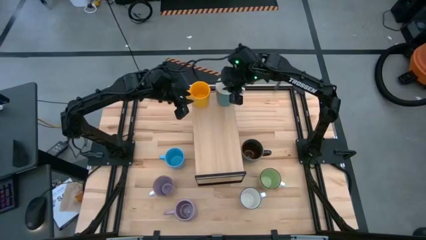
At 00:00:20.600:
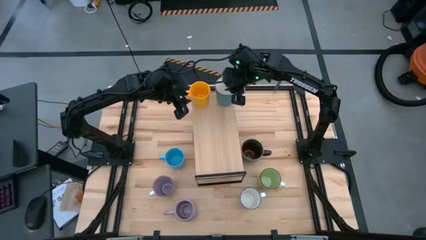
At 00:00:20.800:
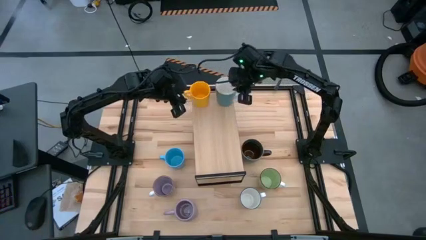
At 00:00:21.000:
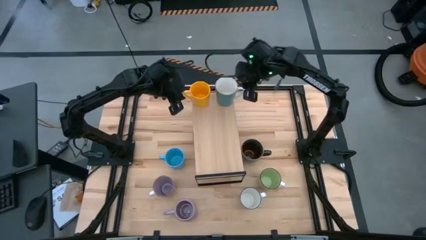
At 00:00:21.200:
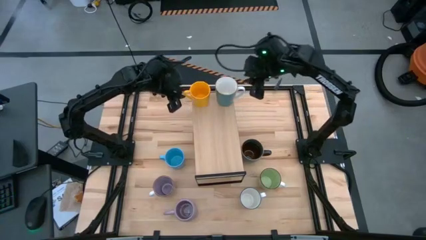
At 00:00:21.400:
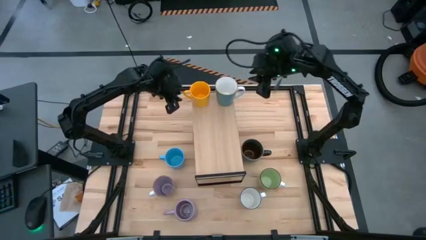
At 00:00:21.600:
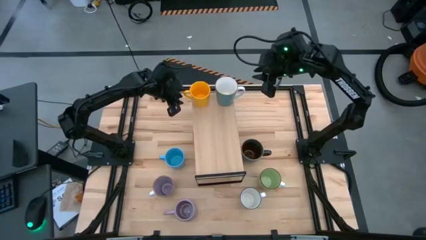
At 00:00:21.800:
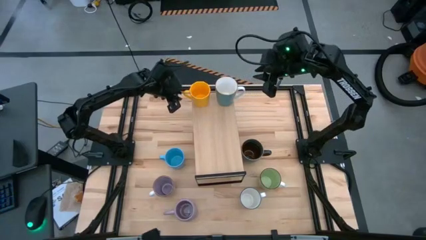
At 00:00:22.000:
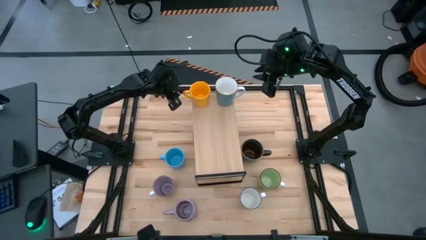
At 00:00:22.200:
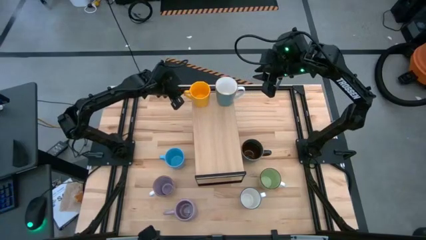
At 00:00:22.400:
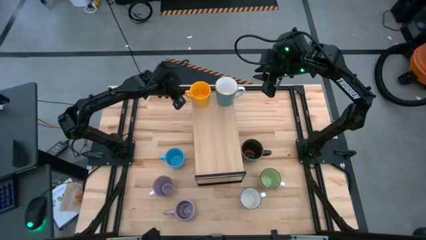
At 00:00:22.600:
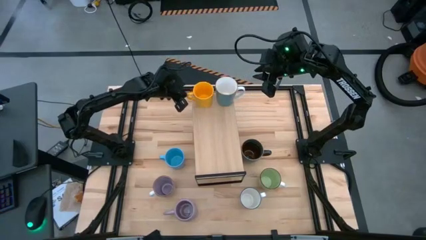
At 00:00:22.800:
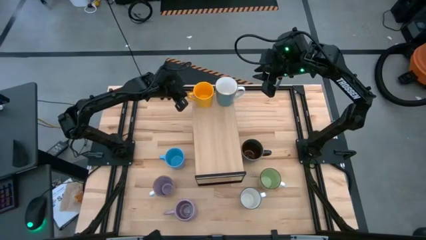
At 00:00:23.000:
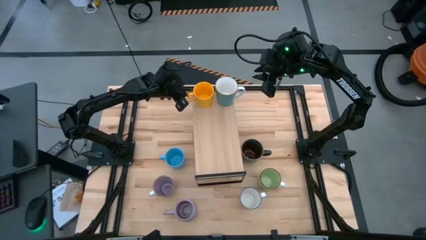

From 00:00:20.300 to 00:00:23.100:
Task: Place coffee mugs
Adjust the yellow cup on the shelf

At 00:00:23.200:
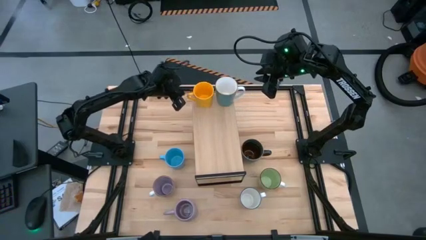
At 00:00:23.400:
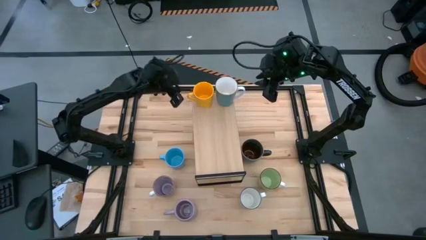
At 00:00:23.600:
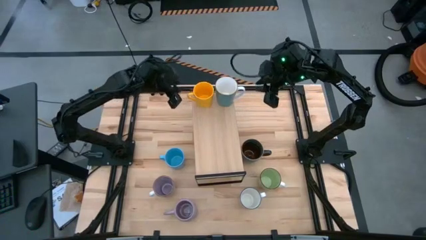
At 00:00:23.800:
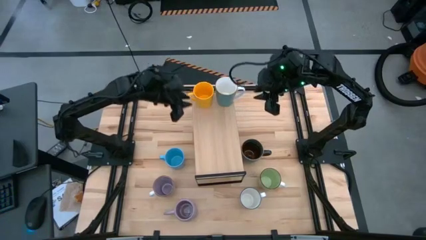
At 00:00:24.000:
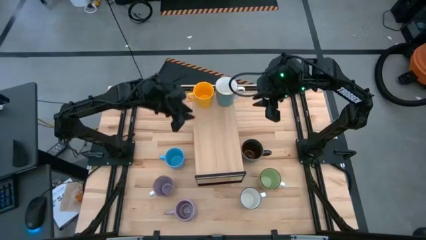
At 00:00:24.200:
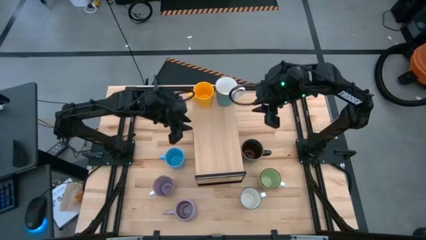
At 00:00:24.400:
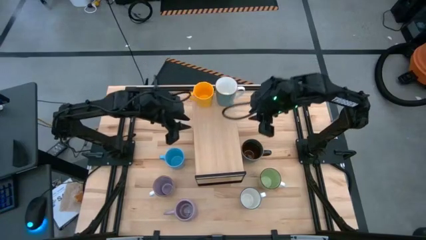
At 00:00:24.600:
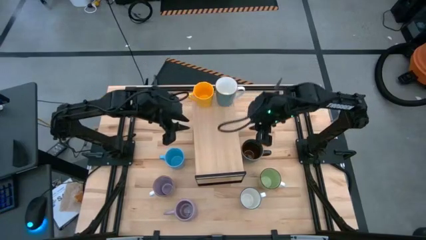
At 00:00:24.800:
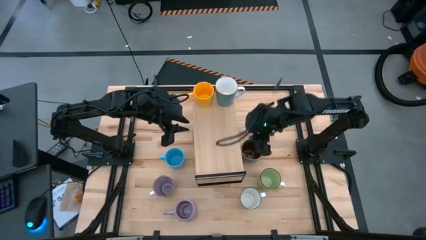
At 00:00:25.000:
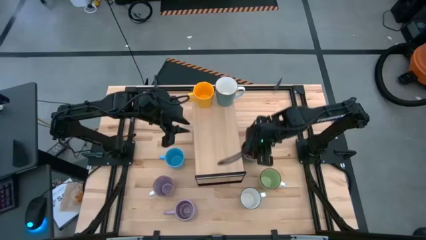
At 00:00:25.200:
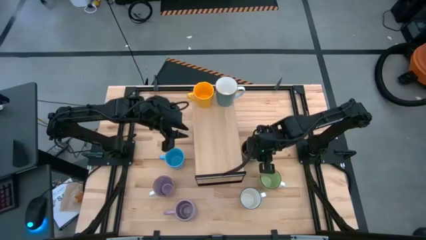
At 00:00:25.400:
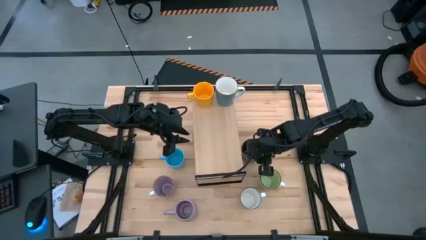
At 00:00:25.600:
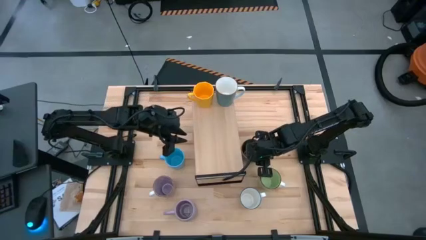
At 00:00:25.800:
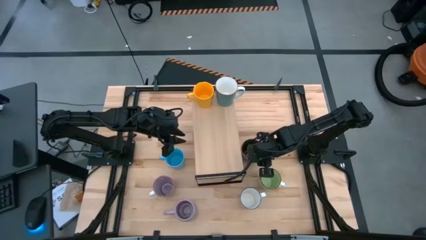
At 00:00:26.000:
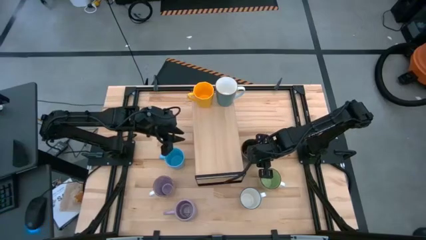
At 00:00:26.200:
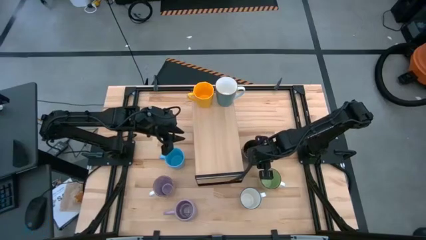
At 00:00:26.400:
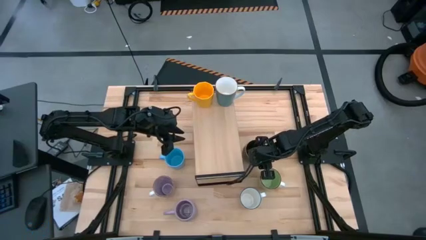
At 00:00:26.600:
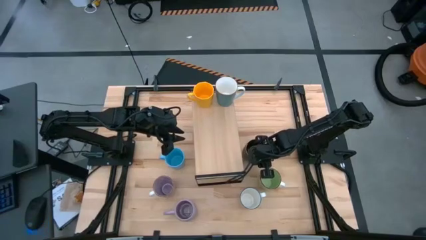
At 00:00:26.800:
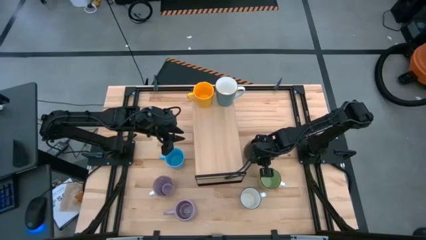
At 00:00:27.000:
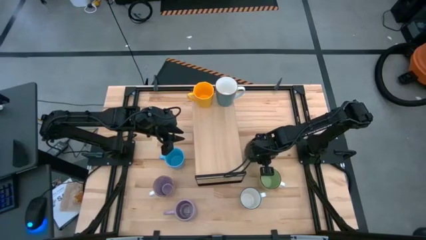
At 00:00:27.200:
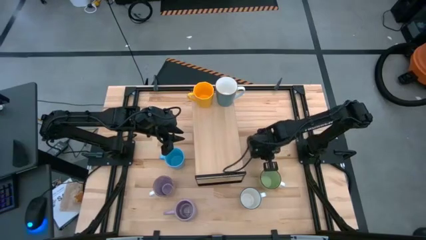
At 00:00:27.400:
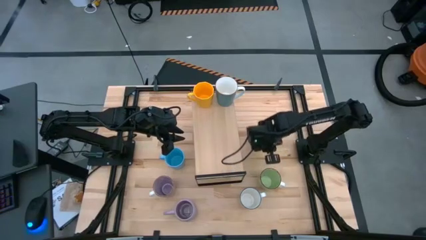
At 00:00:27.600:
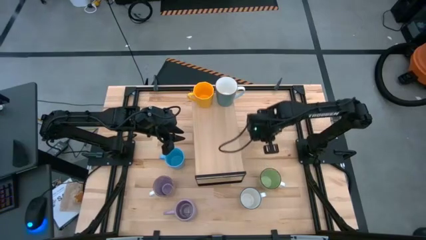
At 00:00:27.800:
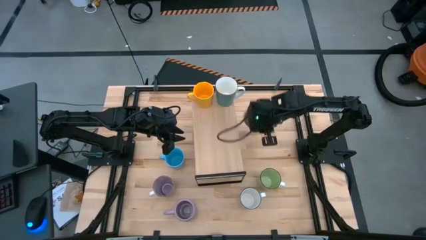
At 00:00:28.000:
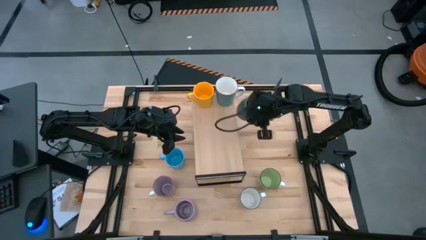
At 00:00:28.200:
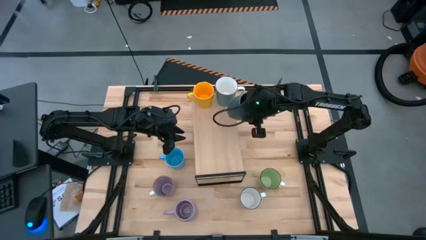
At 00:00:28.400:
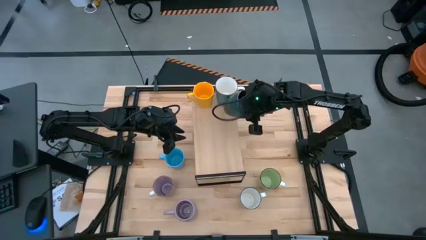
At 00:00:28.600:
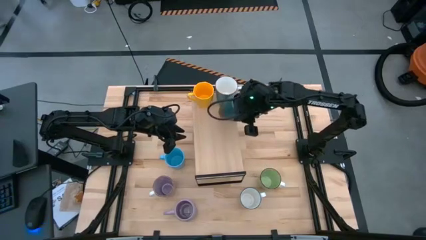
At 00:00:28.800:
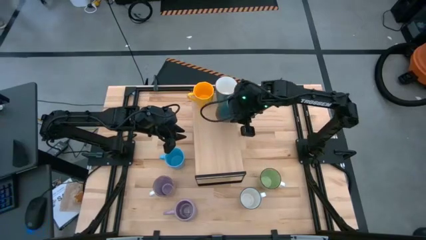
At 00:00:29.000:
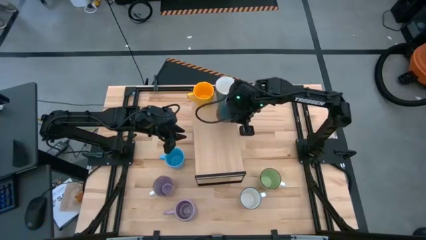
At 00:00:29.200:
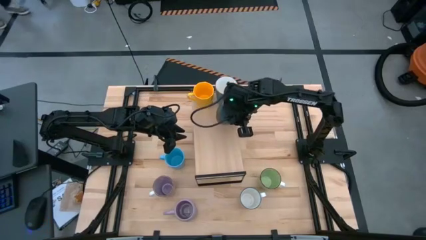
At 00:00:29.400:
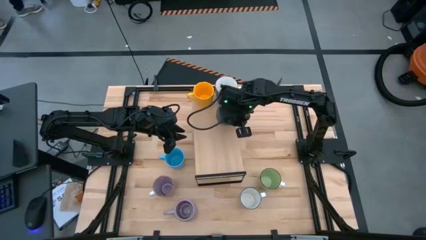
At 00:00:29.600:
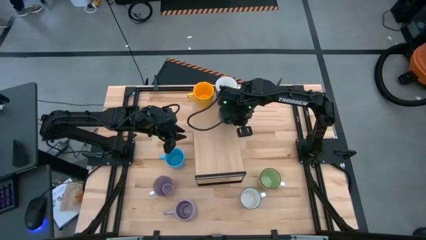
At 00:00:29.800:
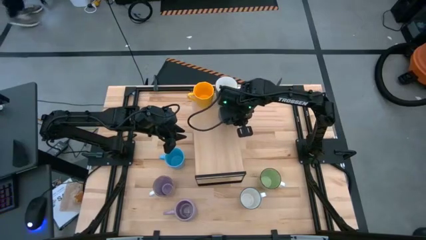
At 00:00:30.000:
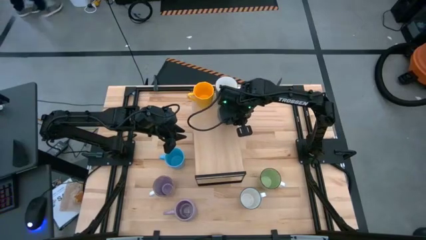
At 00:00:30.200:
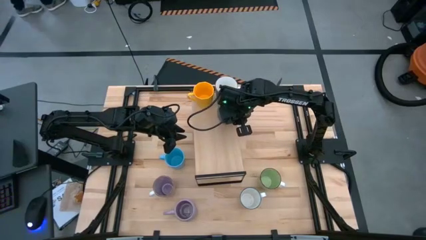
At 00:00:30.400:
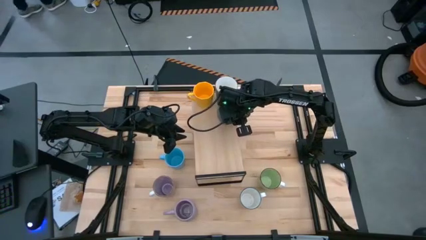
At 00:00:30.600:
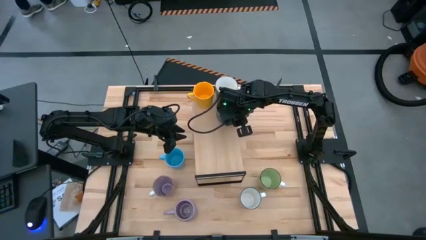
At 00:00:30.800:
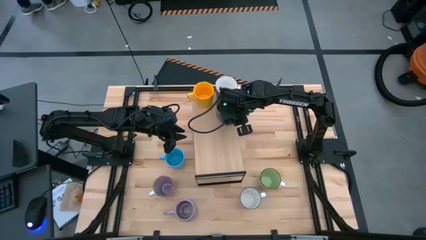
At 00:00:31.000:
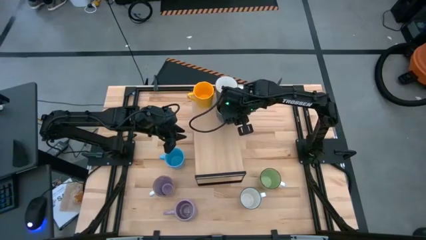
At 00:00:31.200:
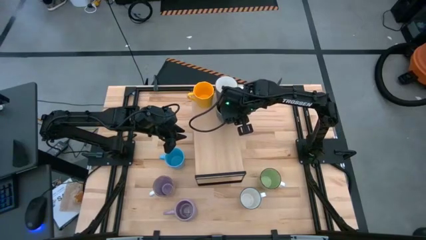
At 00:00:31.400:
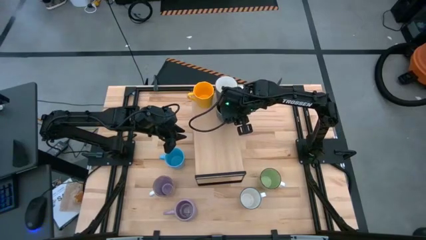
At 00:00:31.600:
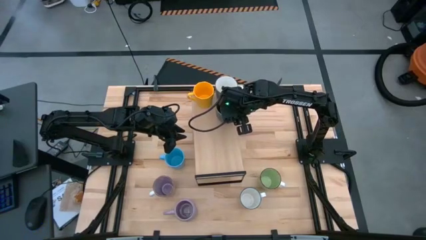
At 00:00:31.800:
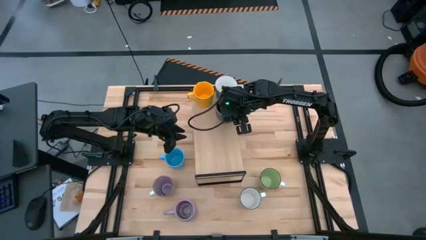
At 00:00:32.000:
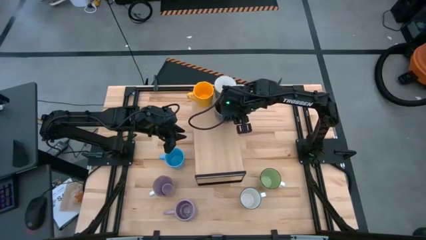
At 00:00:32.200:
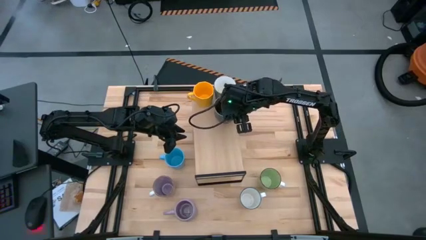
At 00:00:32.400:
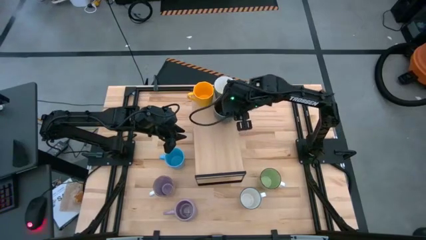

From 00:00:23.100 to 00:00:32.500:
Put the dark blue patterned mug on the shelf

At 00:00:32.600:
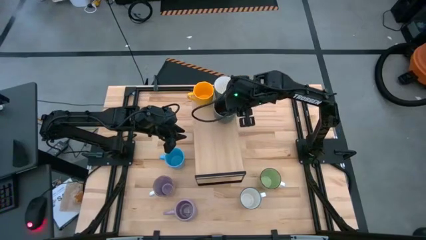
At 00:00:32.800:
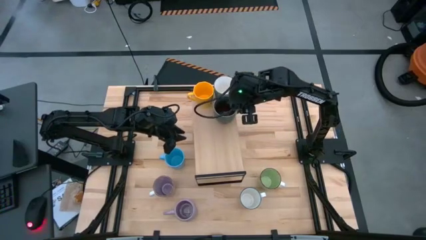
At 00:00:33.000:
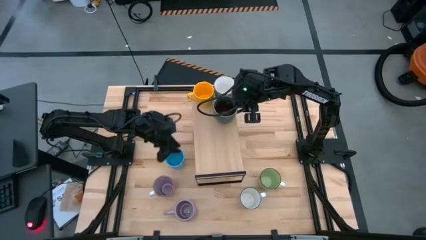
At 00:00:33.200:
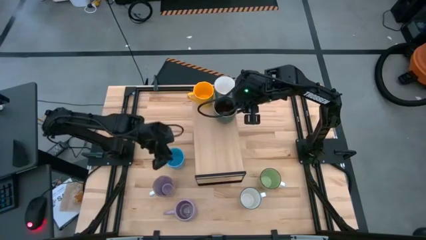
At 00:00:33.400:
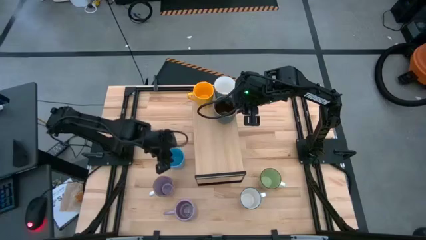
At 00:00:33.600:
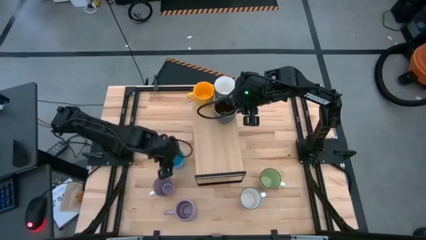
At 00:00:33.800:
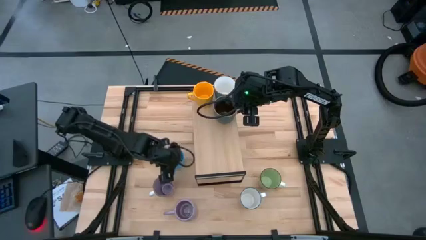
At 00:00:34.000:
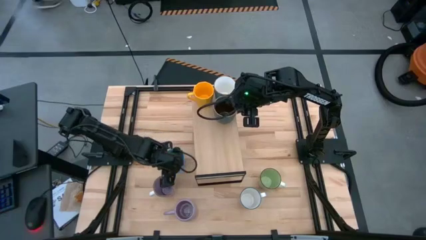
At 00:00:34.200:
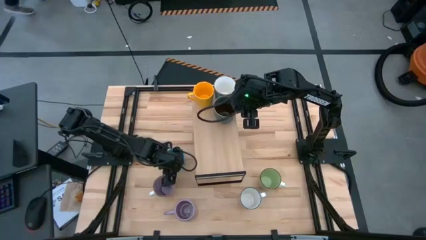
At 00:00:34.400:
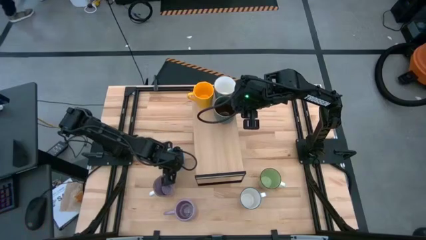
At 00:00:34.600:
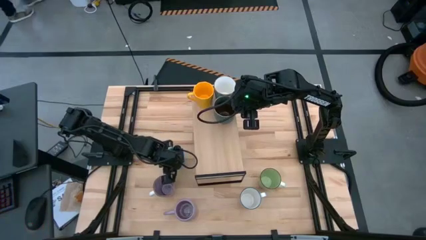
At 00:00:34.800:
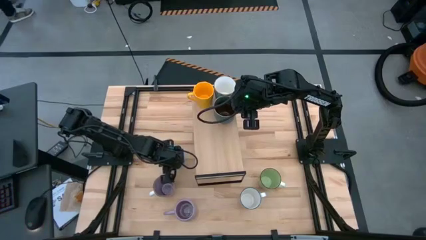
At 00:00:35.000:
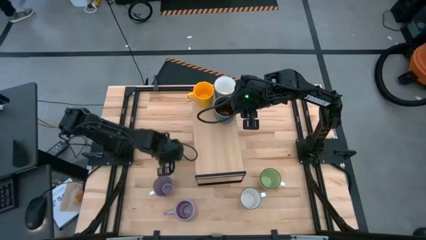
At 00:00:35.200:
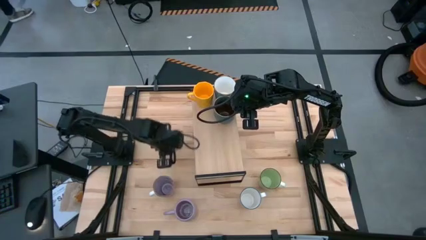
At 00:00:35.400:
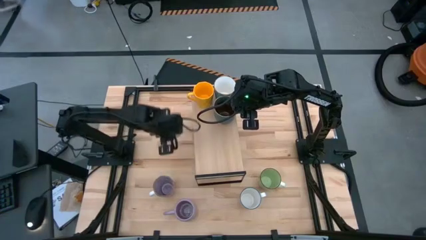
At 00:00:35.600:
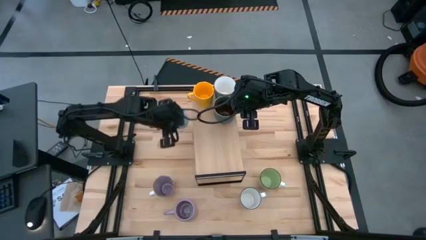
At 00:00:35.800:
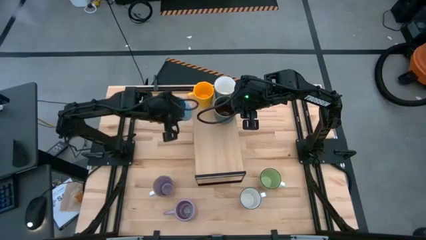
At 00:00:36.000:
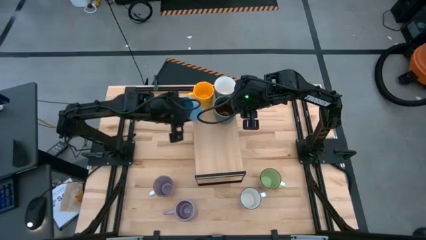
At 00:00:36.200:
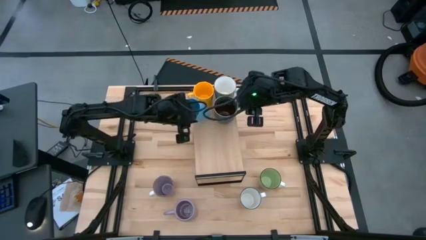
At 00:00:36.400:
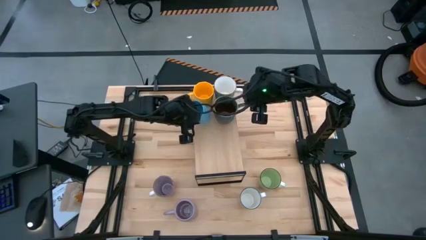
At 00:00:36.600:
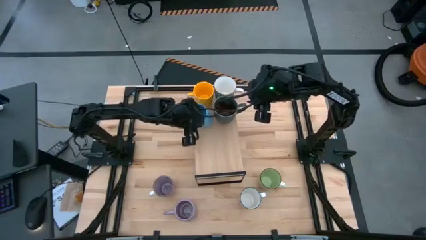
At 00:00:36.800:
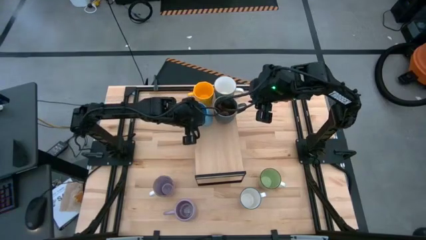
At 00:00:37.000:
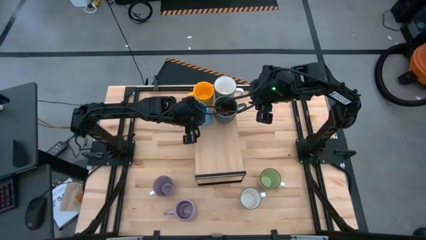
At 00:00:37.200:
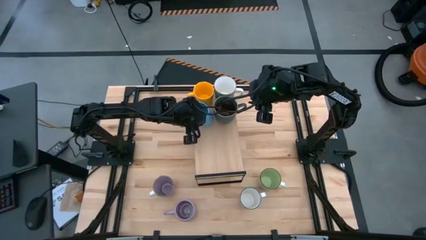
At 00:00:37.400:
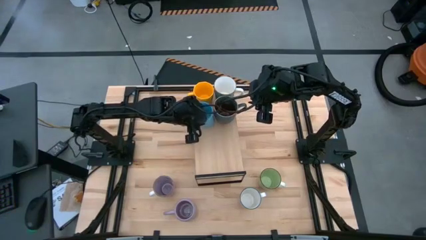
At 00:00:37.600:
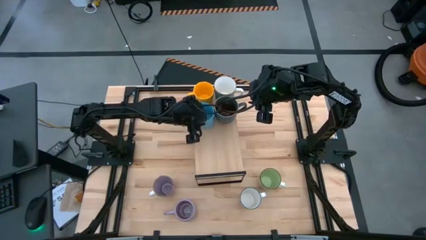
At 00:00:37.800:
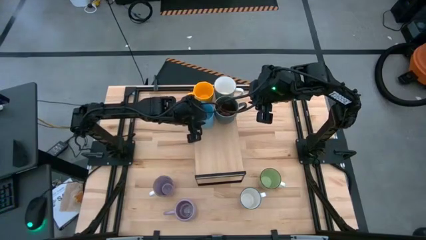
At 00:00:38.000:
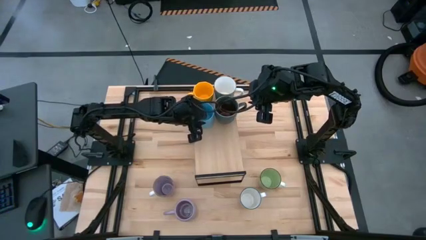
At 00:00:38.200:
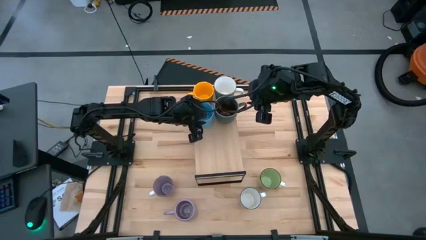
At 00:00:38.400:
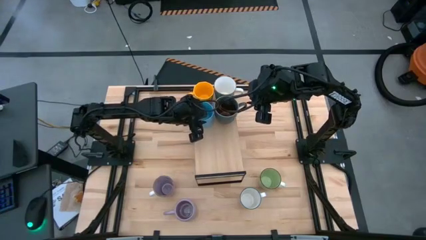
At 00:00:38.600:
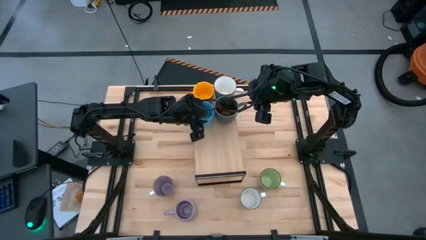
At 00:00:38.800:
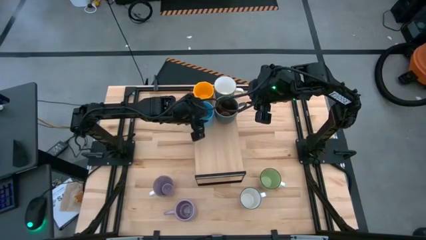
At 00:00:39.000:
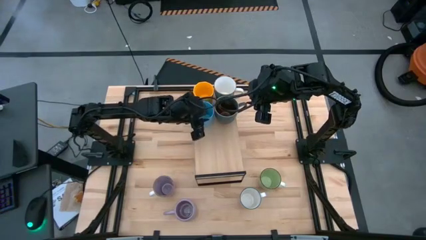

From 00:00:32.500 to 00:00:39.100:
Put the light blue mug on the shelf
